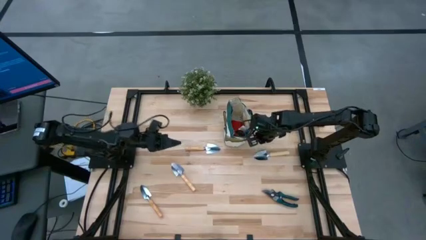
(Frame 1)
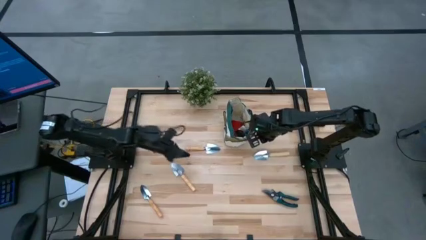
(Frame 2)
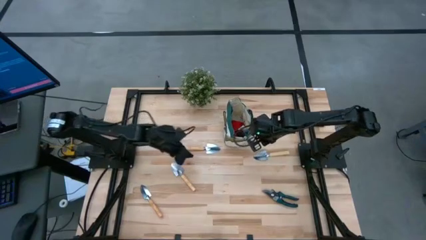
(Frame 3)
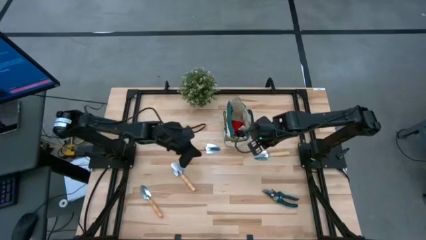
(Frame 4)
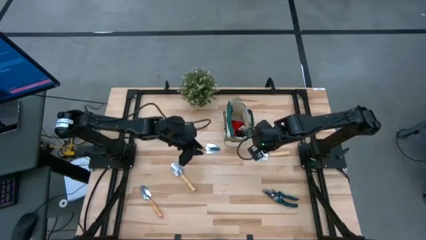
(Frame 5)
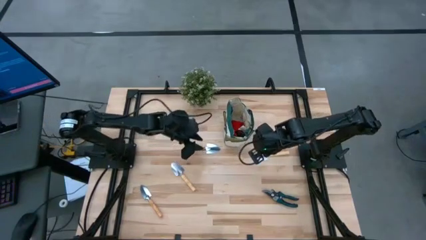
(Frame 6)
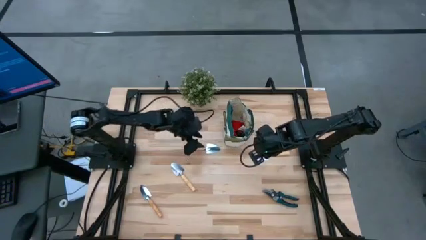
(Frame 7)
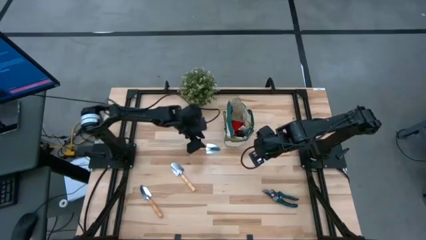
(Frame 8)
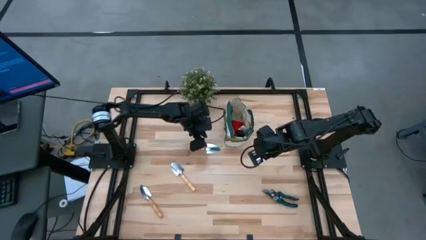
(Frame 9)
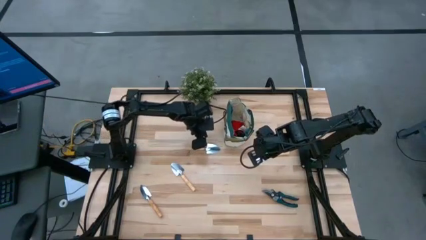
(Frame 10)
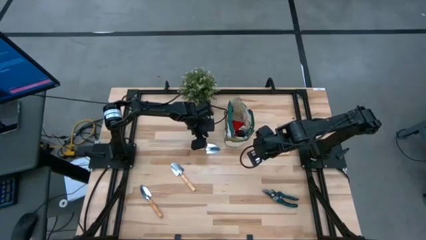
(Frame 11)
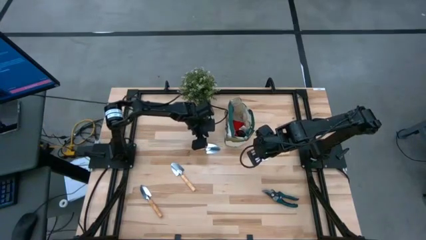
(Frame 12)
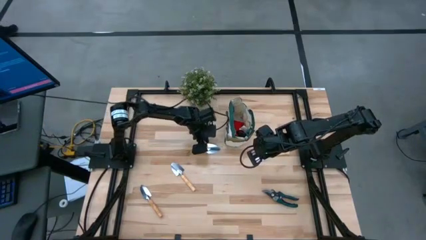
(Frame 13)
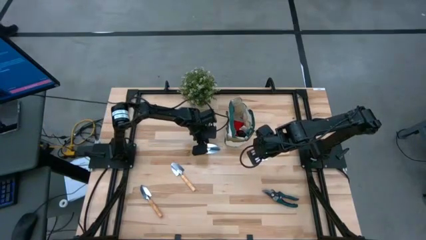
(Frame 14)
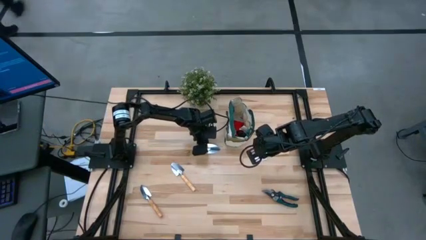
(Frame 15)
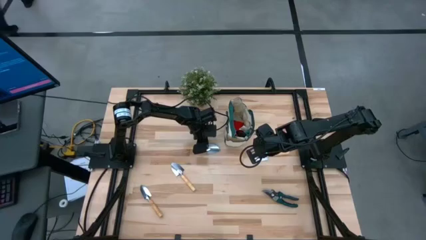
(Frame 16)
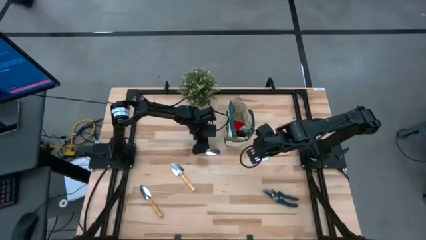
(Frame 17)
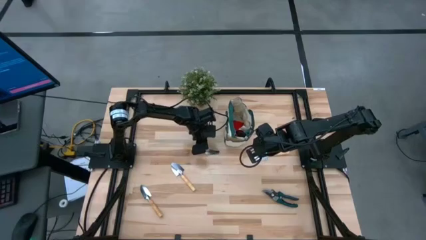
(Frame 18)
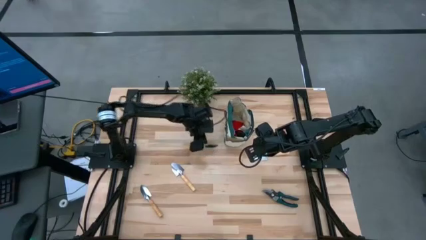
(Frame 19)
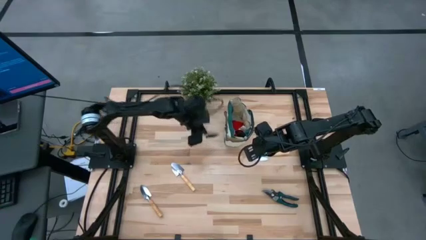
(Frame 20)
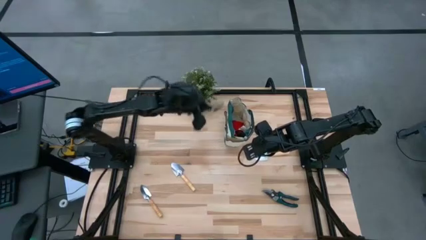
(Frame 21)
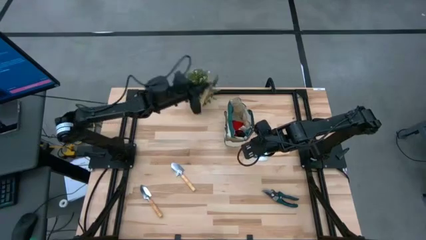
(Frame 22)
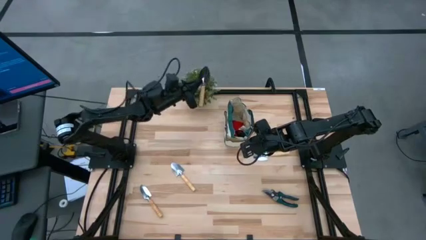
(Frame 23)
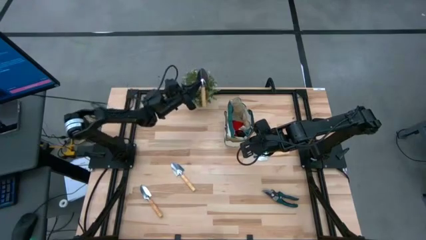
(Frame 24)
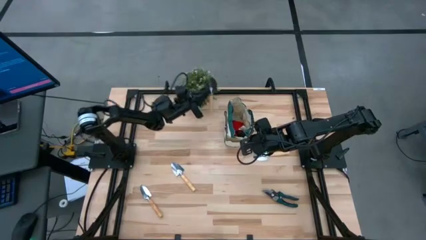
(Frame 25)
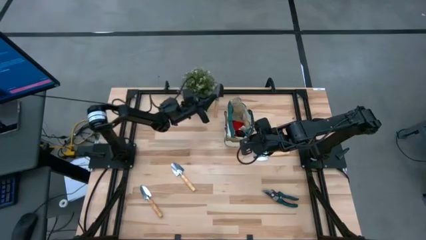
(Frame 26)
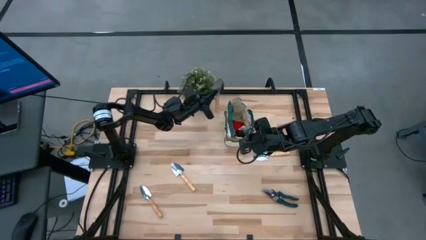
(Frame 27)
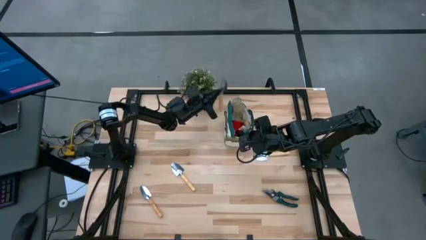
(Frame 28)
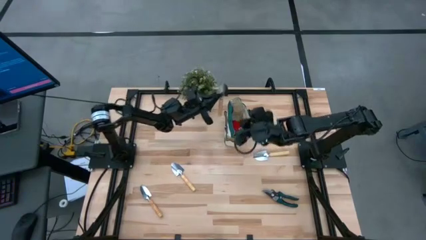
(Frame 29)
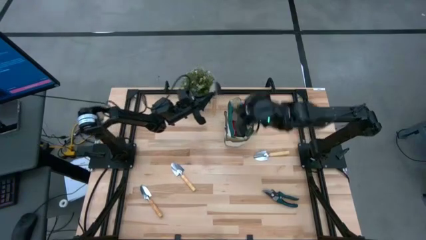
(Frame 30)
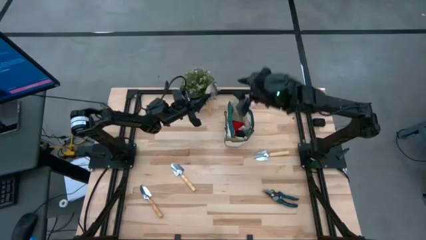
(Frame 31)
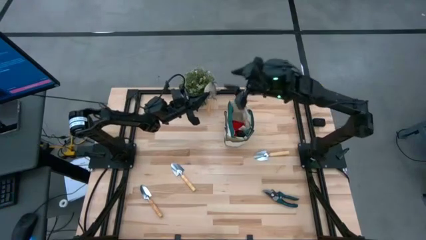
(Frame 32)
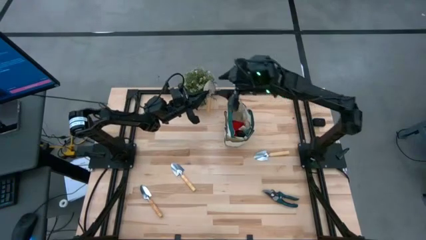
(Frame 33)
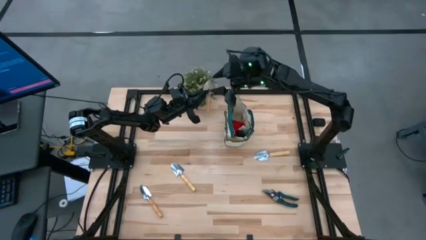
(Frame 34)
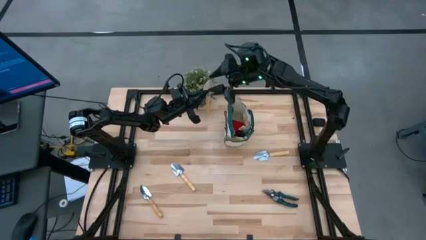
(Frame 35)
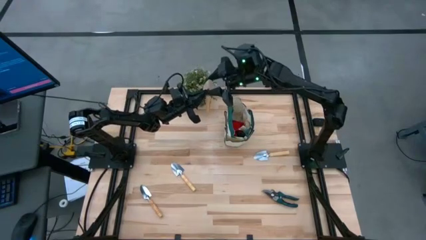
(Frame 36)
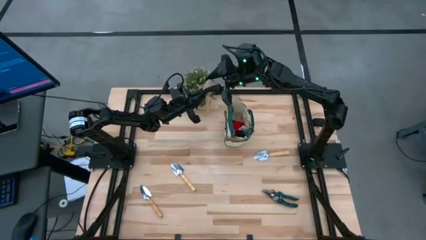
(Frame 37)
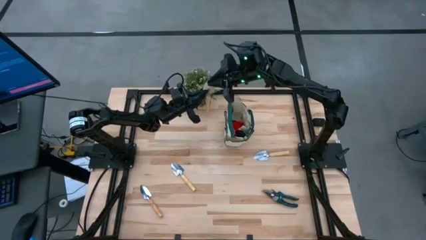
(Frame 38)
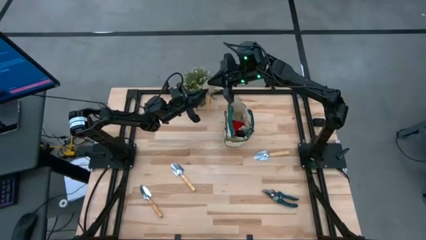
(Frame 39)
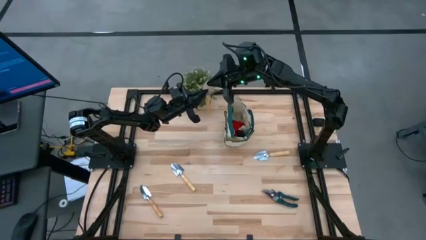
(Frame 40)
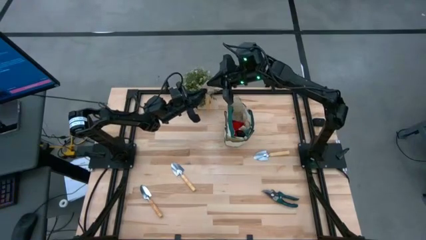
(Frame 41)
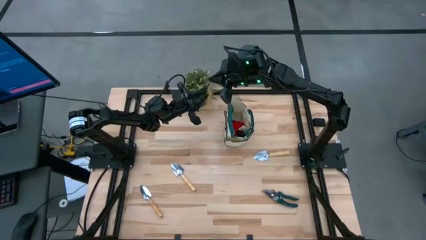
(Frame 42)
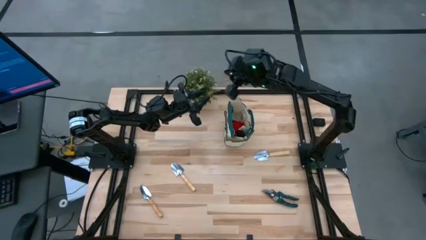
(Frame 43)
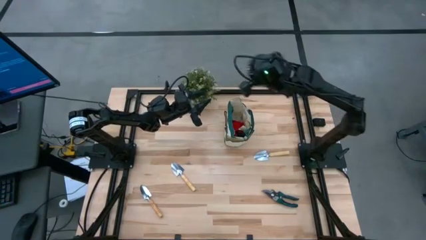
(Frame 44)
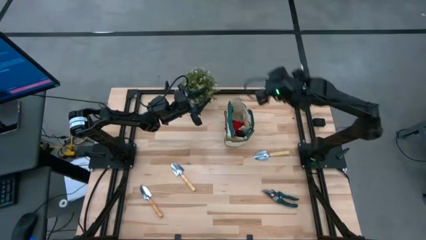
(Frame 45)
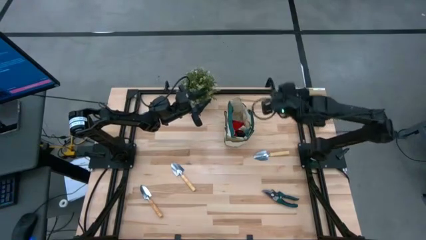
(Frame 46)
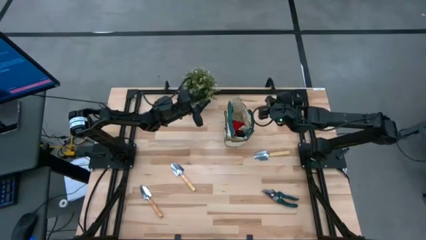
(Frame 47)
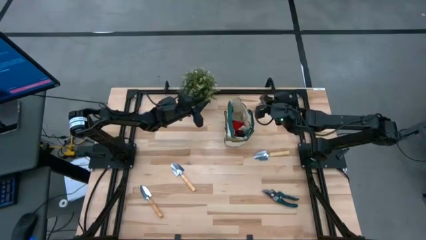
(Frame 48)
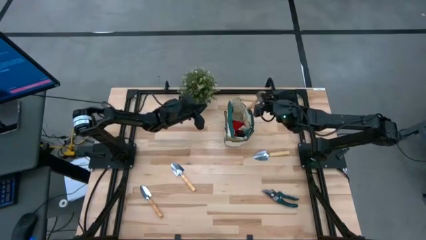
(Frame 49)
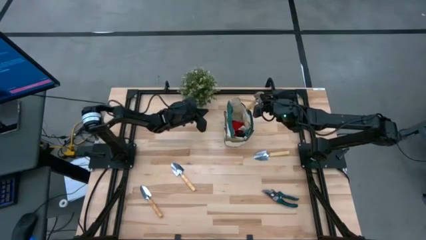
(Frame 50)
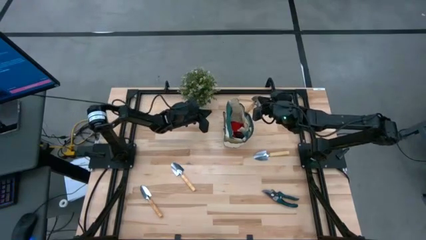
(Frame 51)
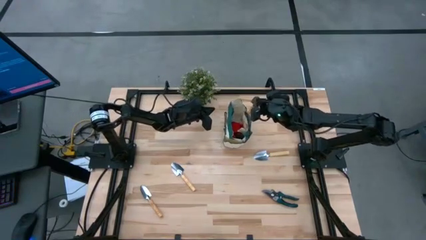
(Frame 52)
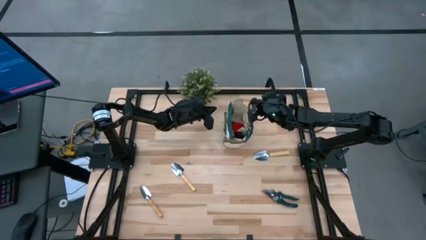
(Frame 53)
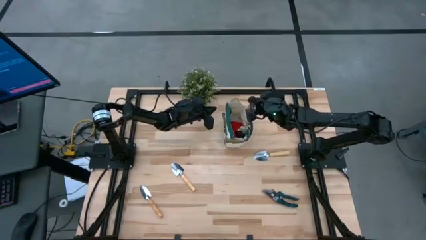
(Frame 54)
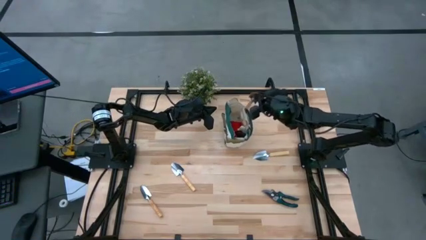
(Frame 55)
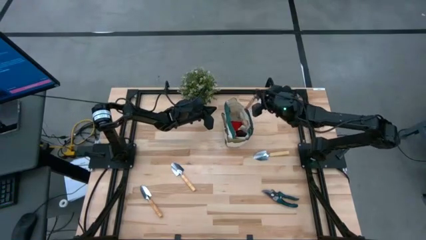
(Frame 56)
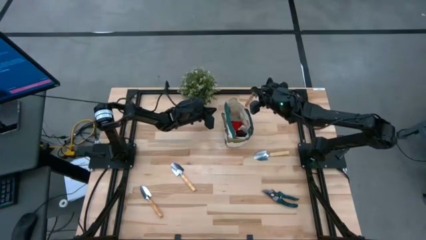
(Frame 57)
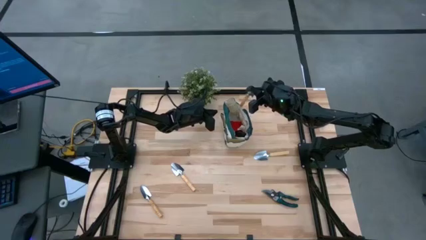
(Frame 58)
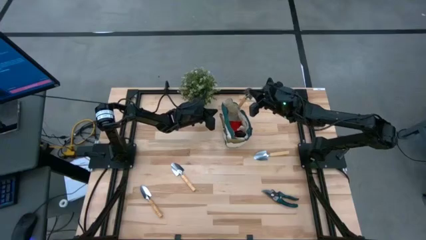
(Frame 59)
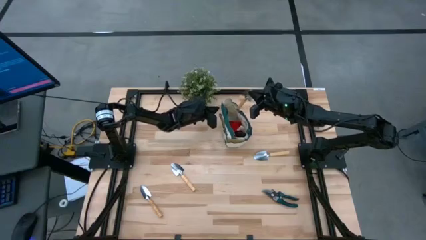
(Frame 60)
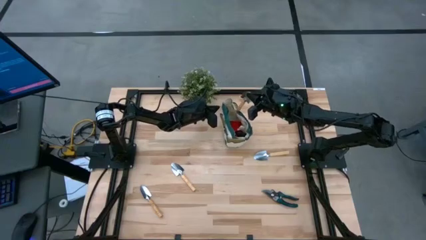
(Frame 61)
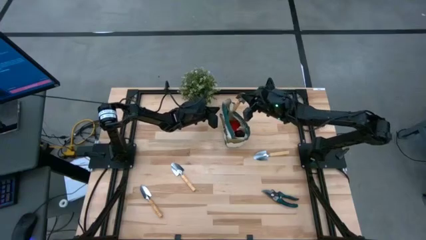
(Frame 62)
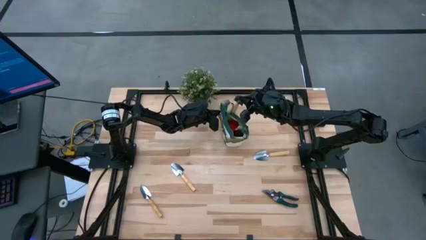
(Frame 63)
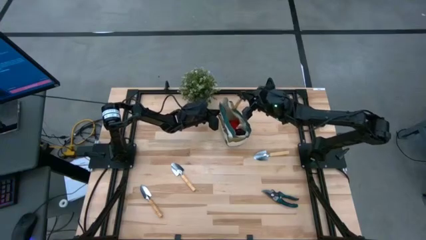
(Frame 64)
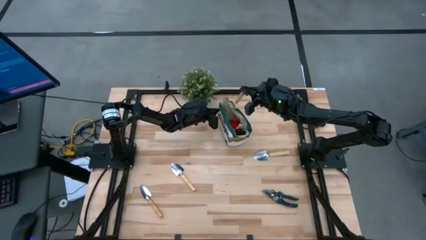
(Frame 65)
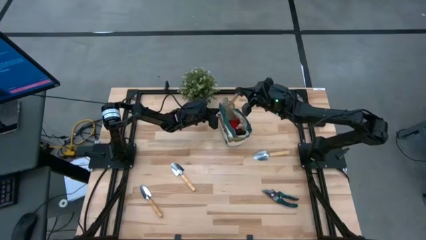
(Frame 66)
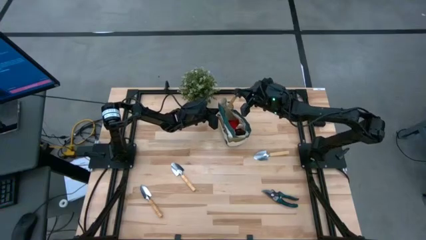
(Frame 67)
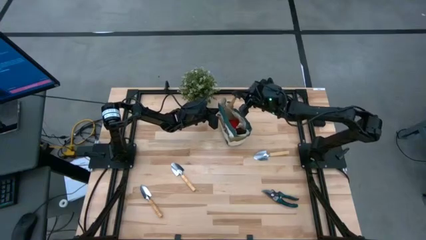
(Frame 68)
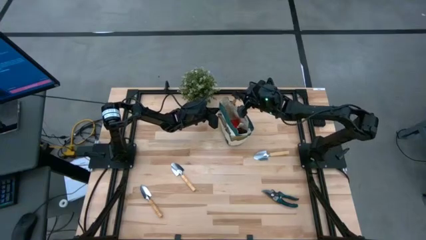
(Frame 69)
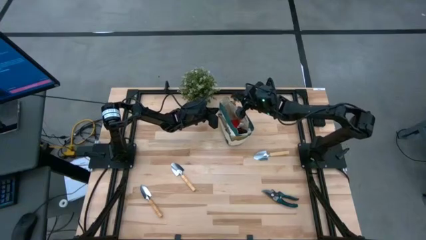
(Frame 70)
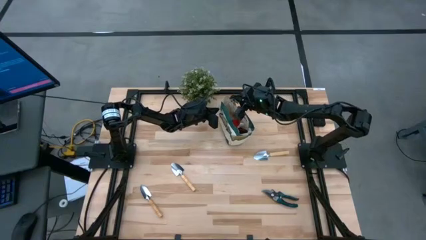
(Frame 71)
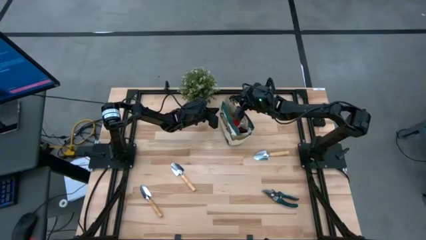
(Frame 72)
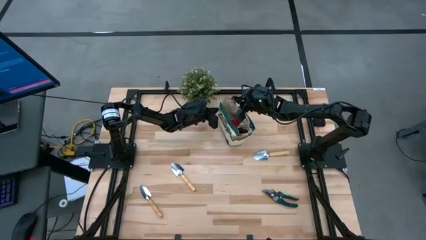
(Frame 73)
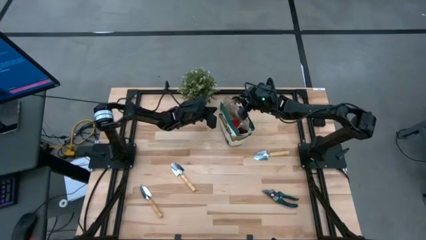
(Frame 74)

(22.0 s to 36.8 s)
Task: Pick & Place Garden tools in Gardening bag
Put the brown trowel into the white gardening bag
